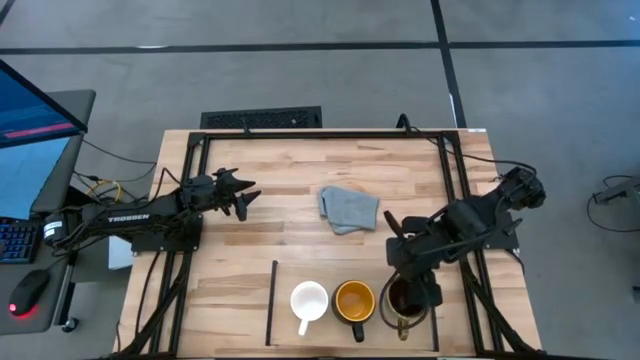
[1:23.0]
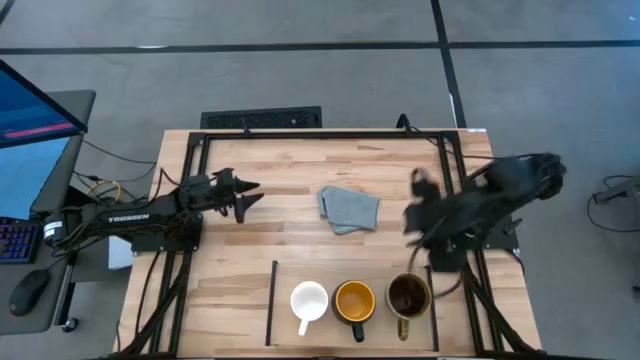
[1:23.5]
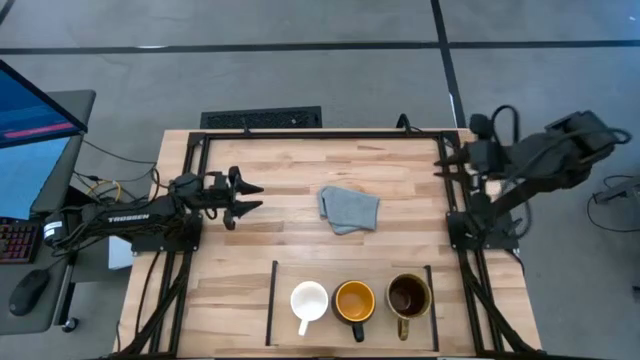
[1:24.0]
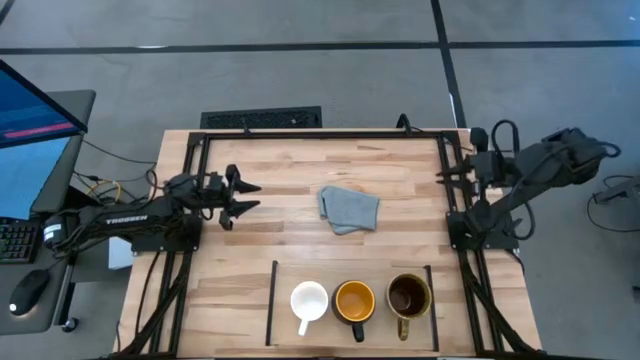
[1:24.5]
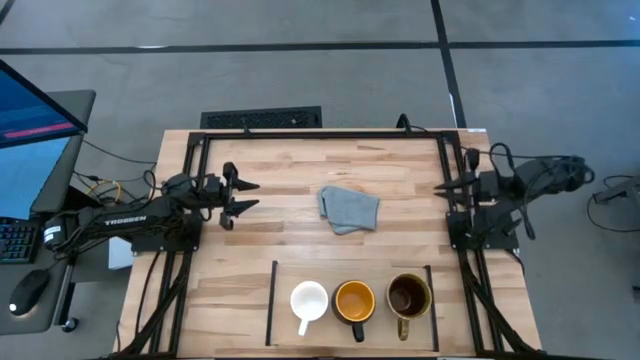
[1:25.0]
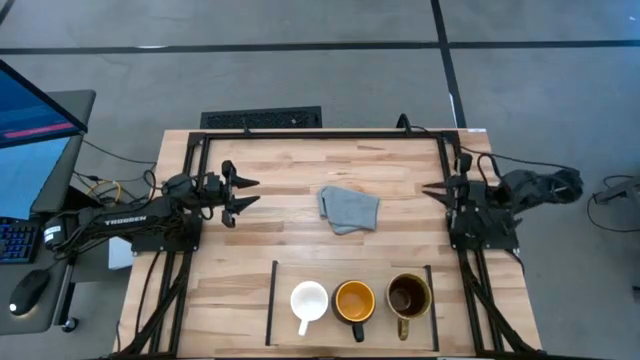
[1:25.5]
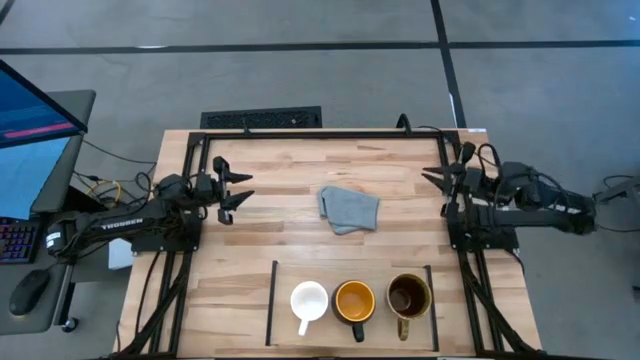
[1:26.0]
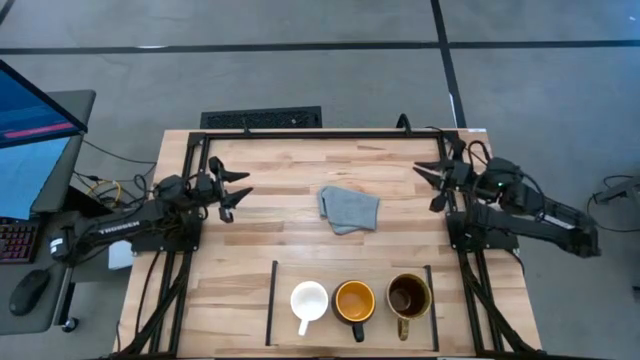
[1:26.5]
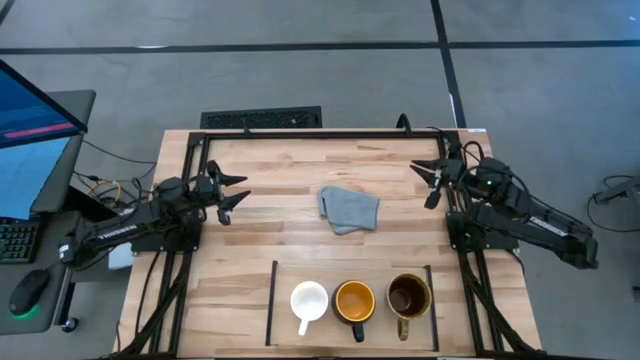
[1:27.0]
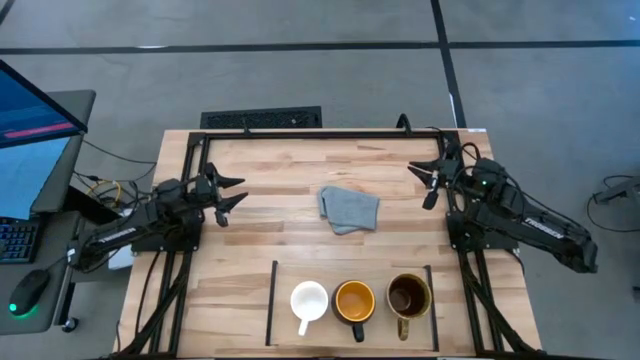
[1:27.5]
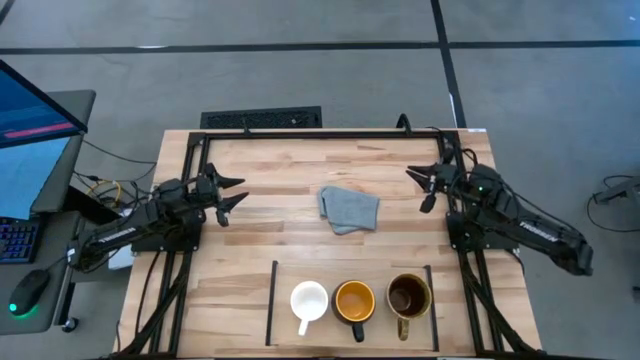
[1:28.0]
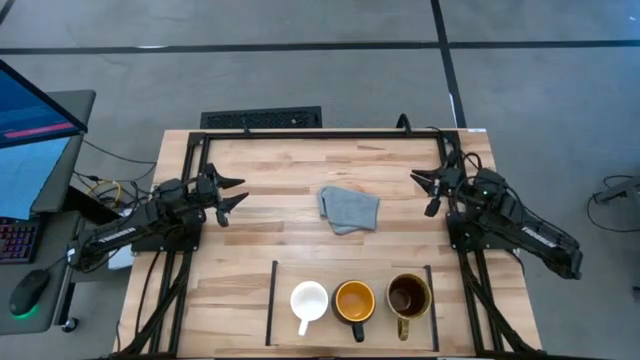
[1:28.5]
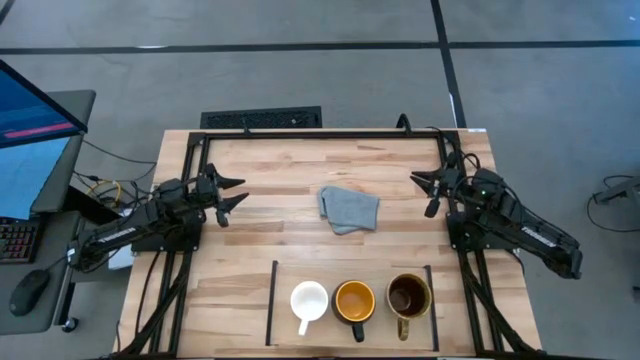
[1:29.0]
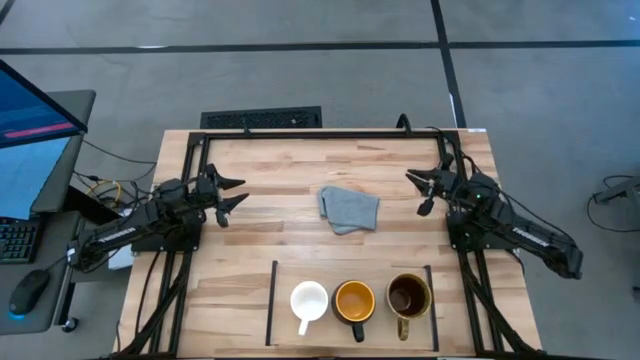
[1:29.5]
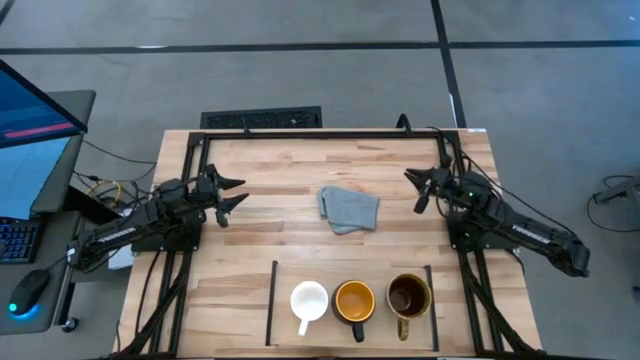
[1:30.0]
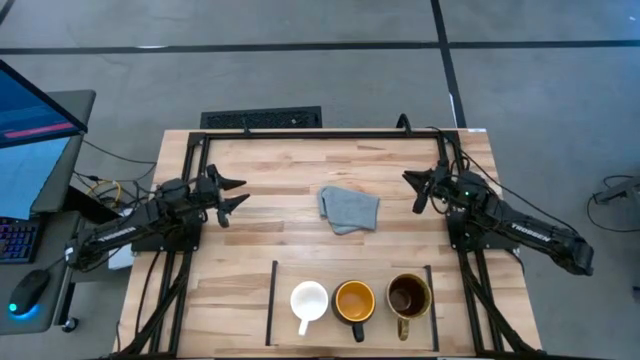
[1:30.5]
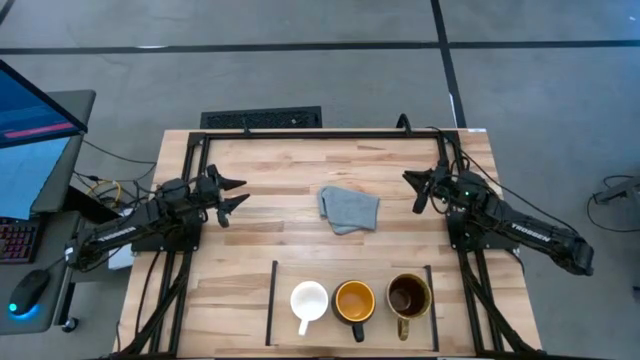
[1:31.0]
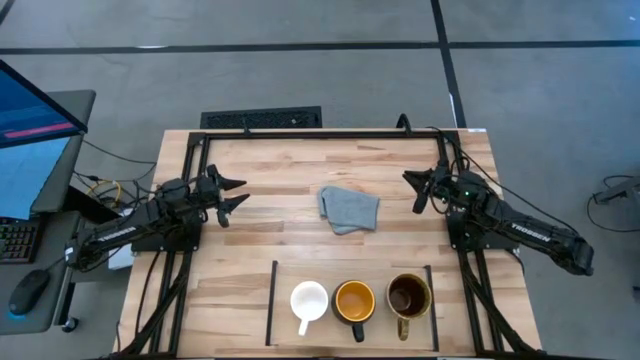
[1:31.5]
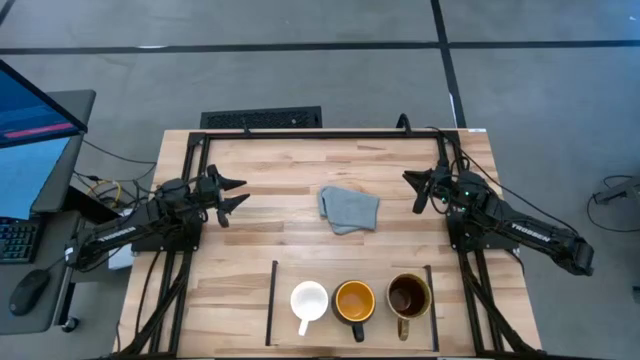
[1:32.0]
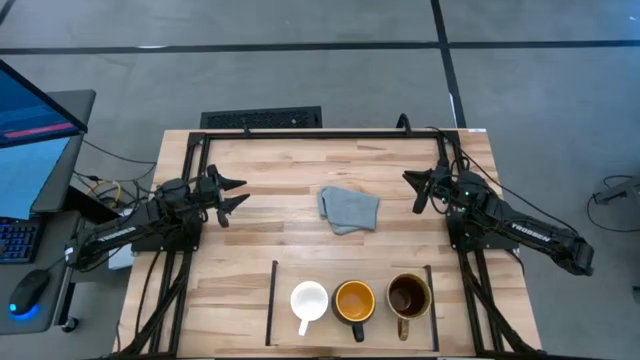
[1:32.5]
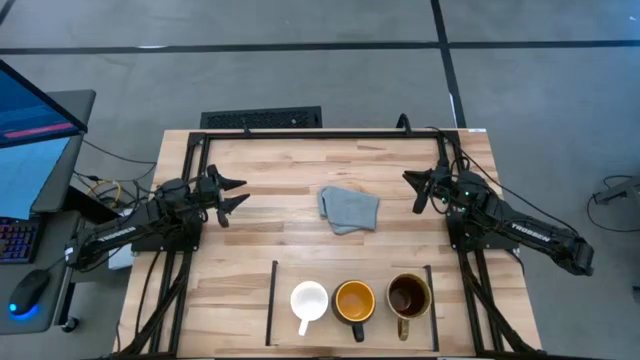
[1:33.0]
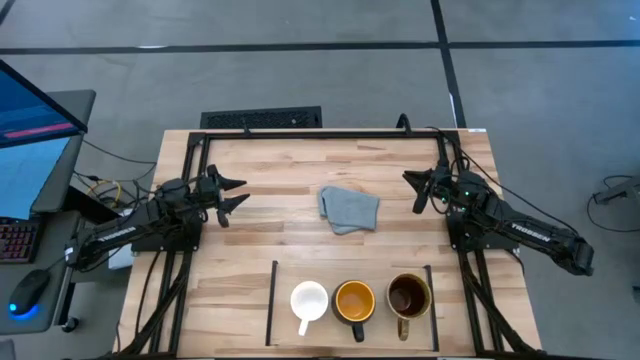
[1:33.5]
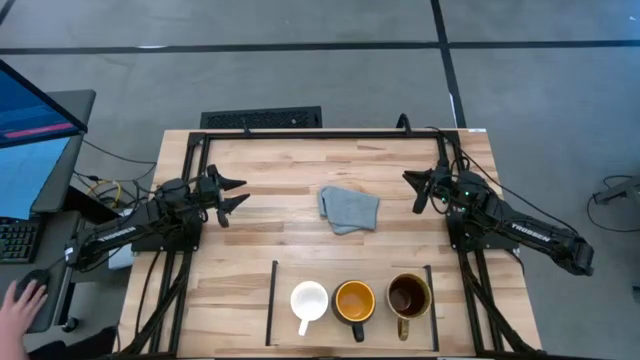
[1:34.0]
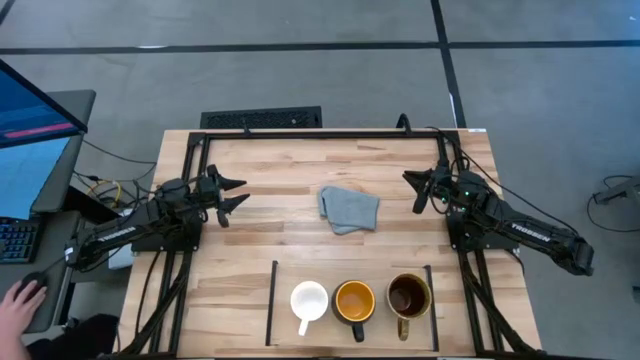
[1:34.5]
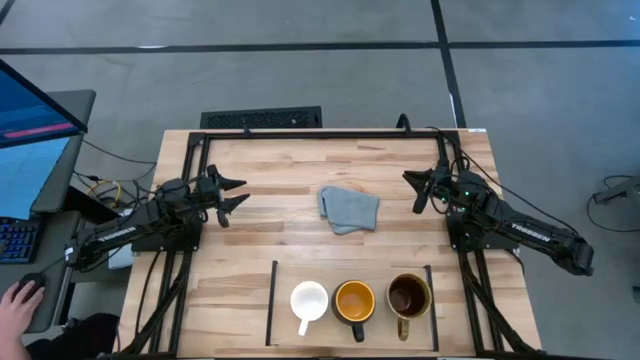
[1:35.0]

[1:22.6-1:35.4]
Task: Stack small to large cups/mugs on shelf
Return to Home Position

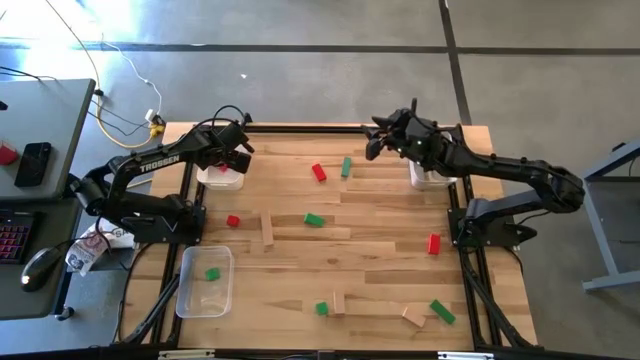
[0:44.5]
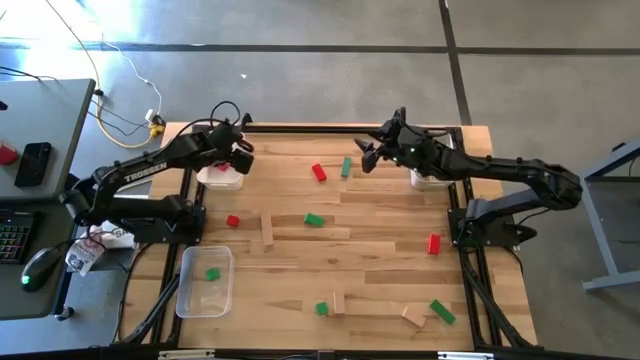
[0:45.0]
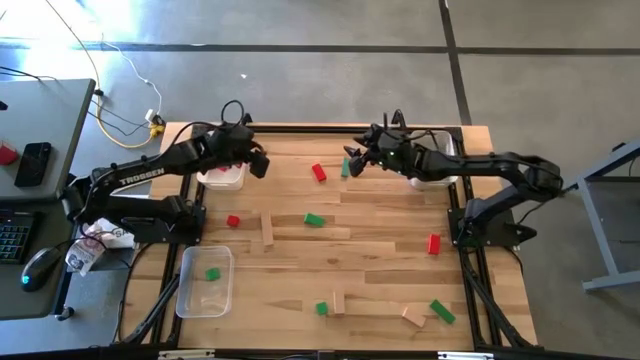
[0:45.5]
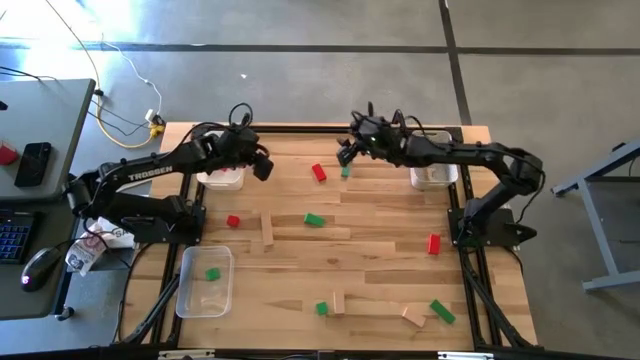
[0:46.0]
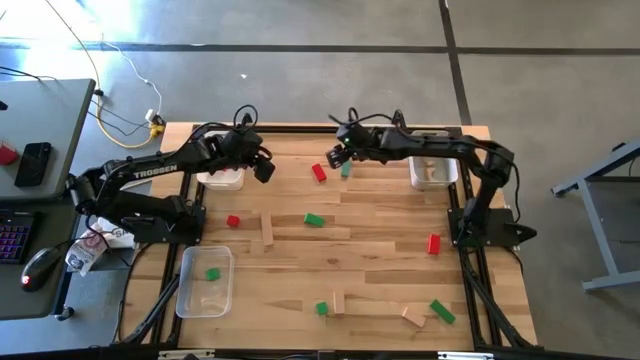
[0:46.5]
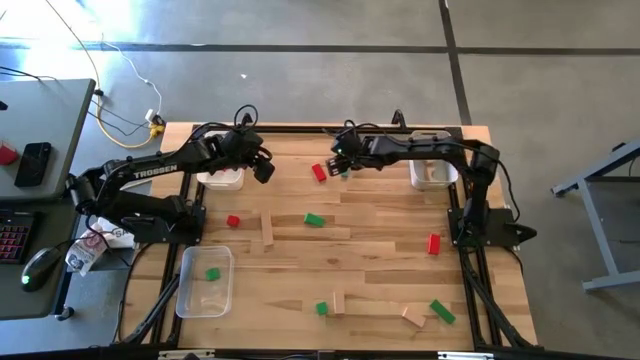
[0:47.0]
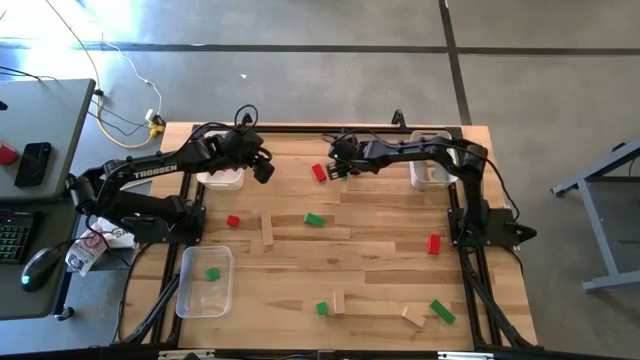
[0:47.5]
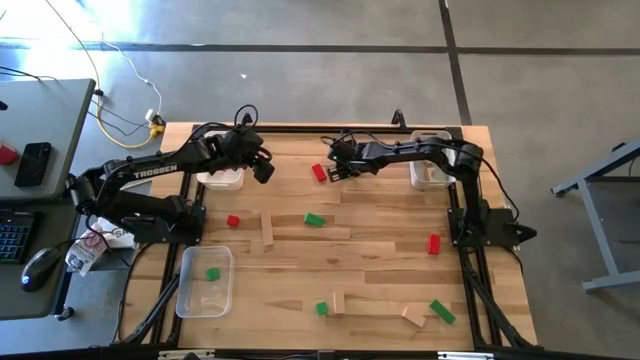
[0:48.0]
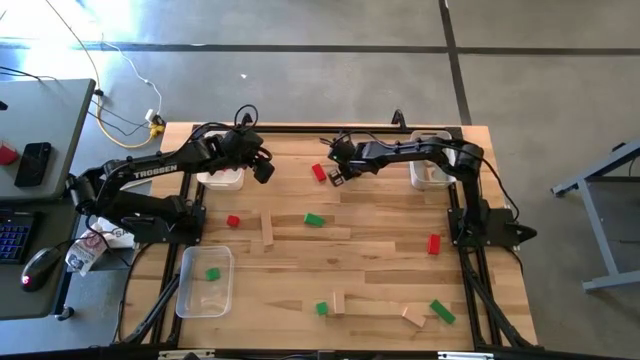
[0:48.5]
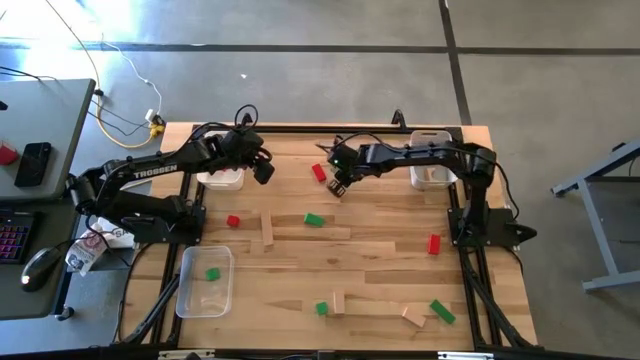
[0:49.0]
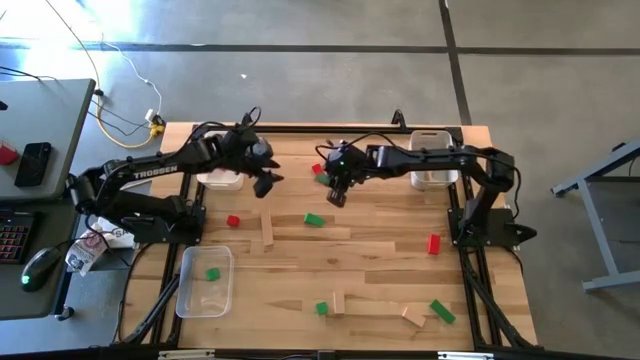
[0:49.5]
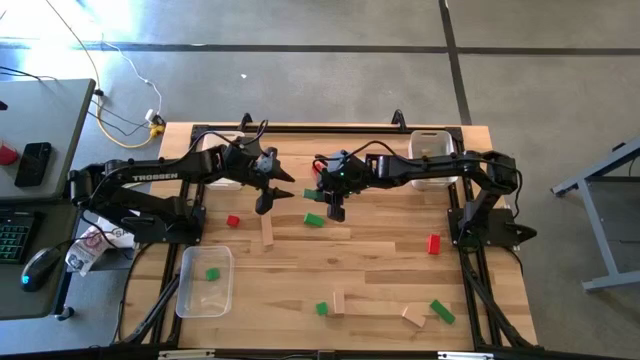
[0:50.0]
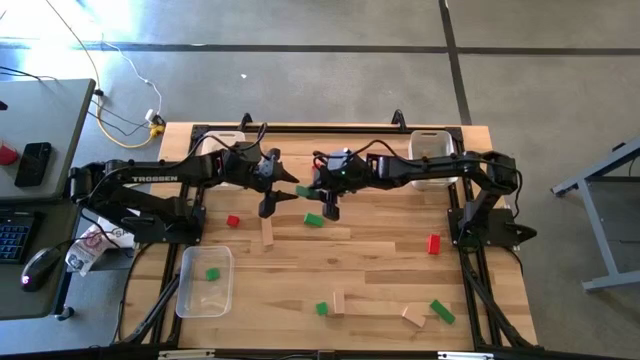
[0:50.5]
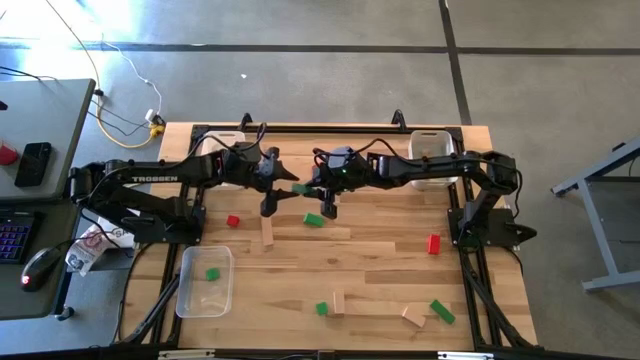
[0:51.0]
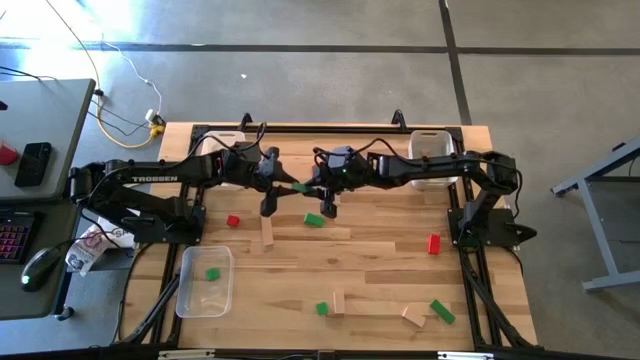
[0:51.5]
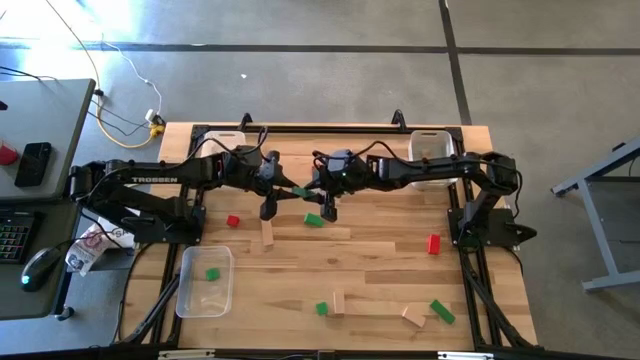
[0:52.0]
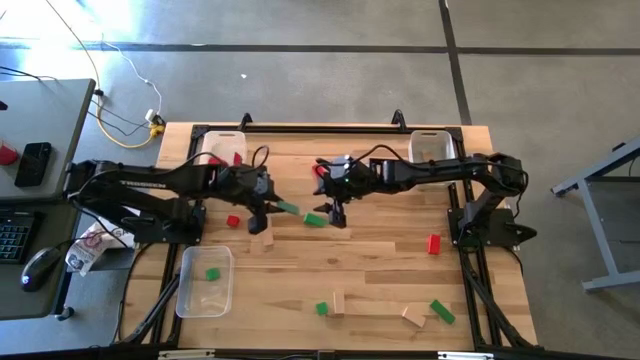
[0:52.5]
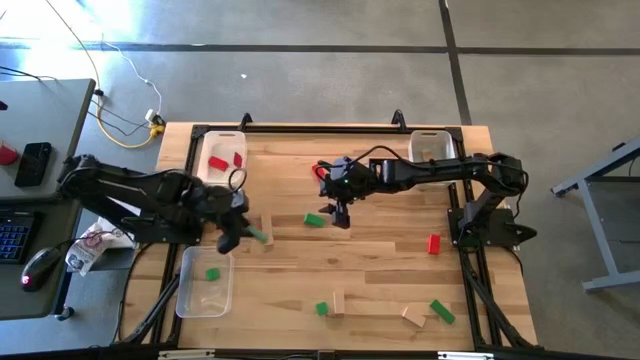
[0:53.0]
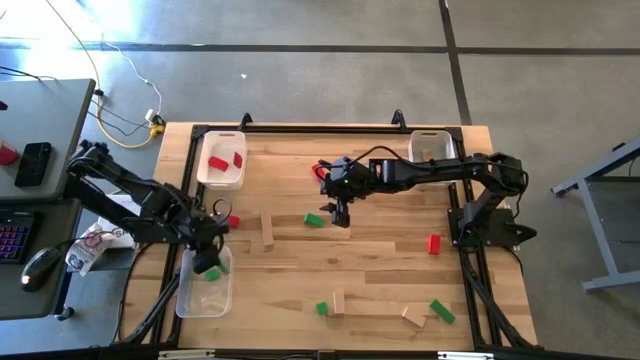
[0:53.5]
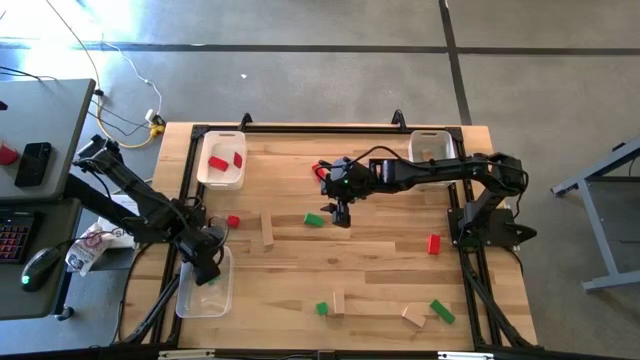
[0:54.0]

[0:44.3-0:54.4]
Task: Sort & place blocks by color
Put the green block into the transparent bin
